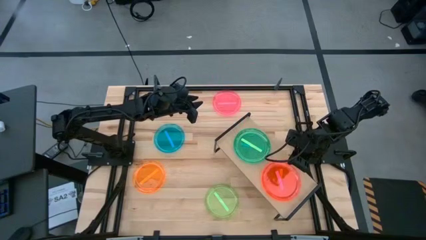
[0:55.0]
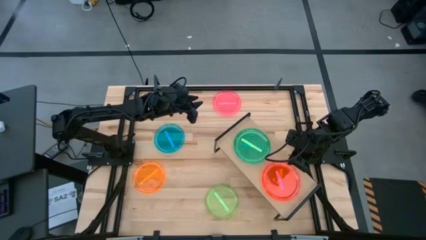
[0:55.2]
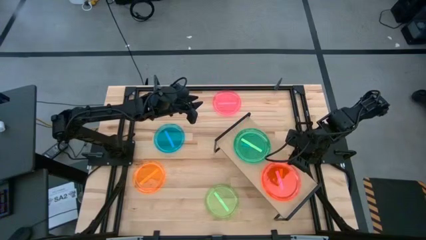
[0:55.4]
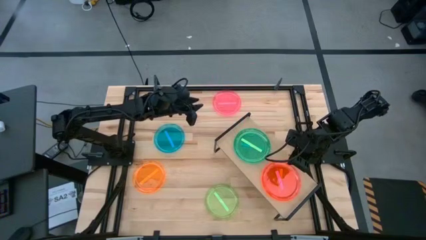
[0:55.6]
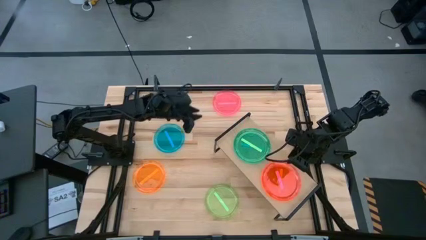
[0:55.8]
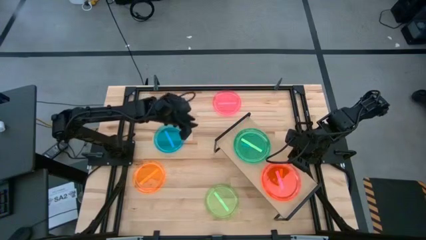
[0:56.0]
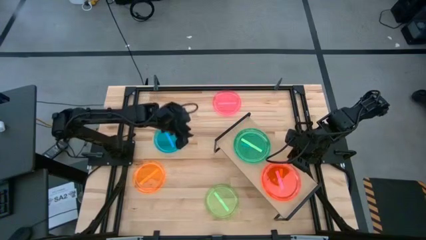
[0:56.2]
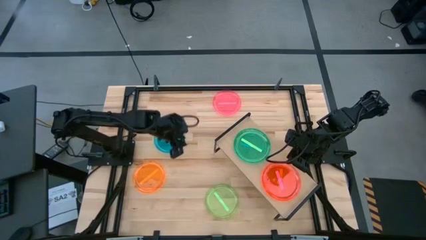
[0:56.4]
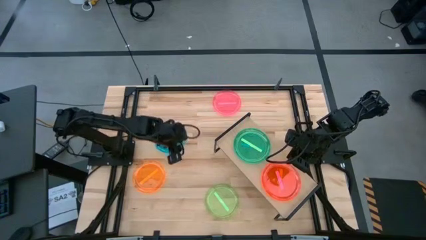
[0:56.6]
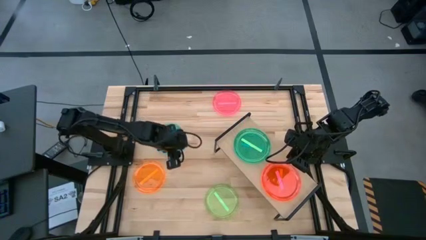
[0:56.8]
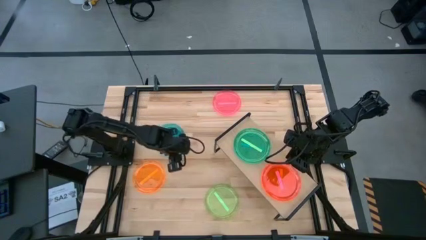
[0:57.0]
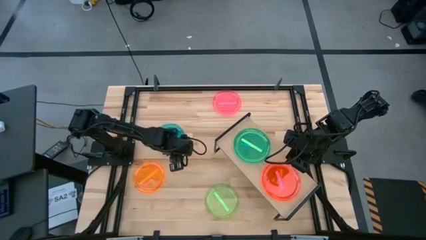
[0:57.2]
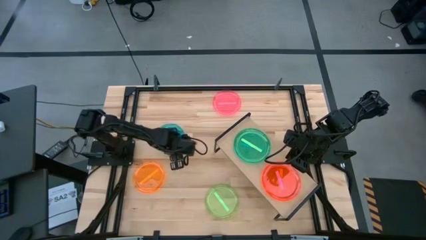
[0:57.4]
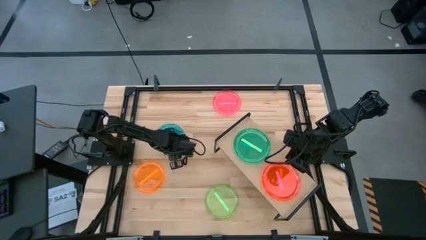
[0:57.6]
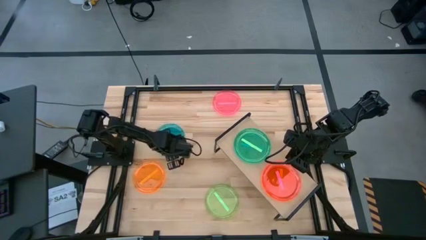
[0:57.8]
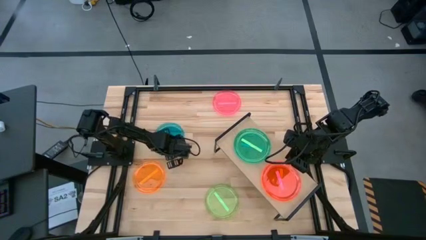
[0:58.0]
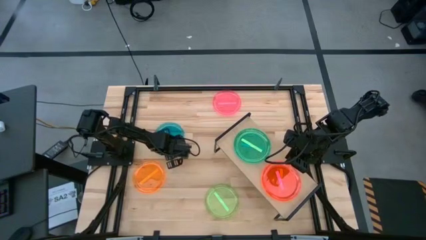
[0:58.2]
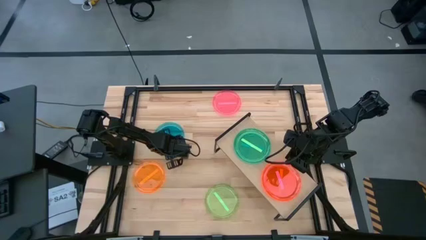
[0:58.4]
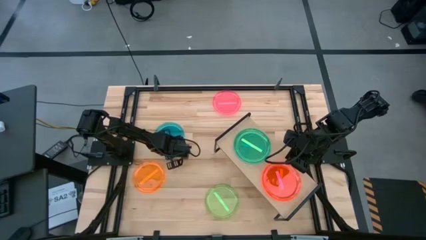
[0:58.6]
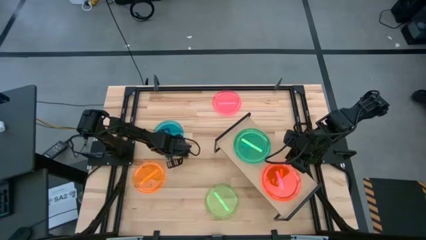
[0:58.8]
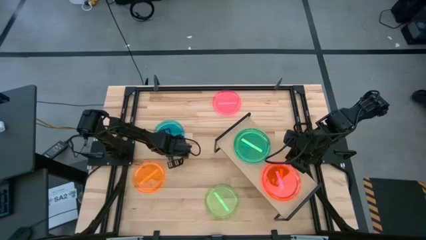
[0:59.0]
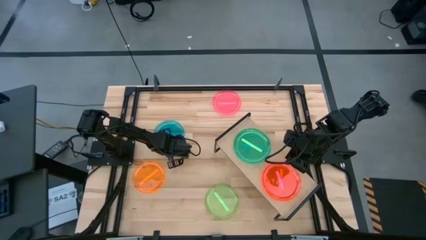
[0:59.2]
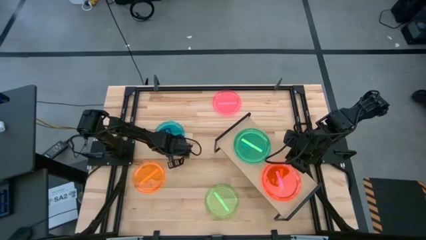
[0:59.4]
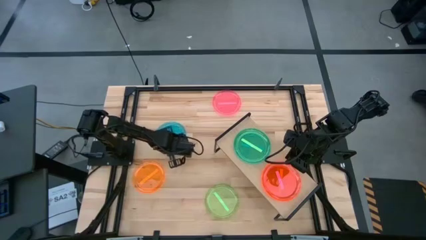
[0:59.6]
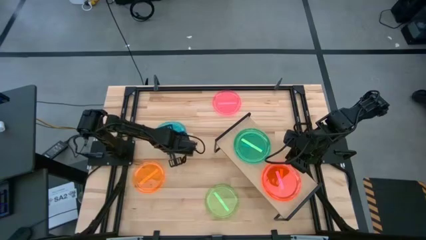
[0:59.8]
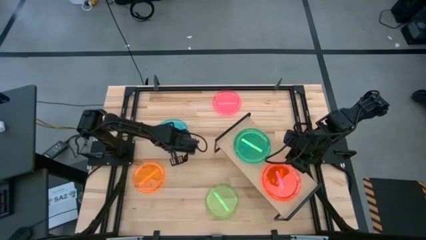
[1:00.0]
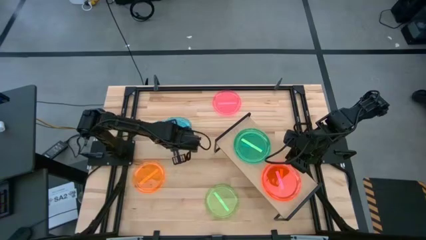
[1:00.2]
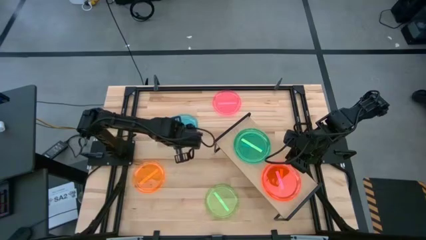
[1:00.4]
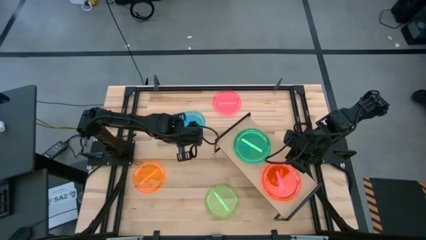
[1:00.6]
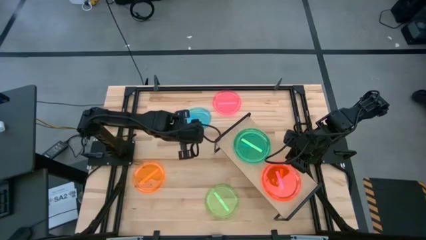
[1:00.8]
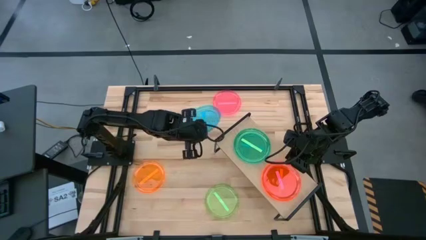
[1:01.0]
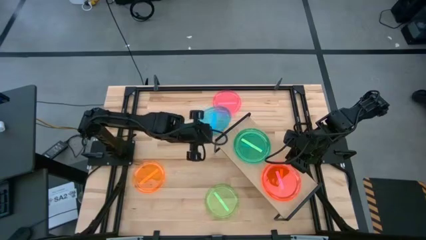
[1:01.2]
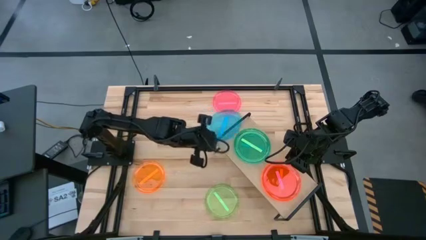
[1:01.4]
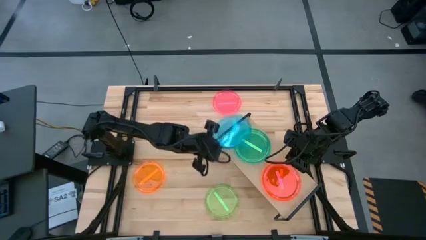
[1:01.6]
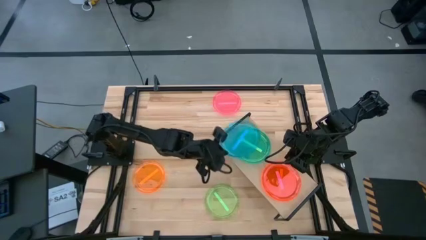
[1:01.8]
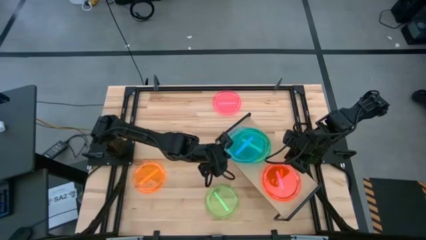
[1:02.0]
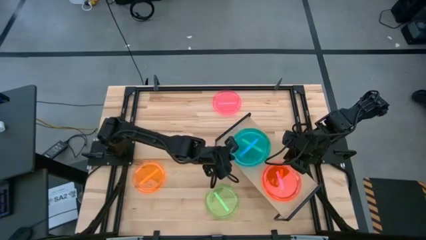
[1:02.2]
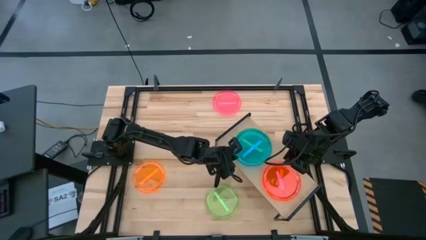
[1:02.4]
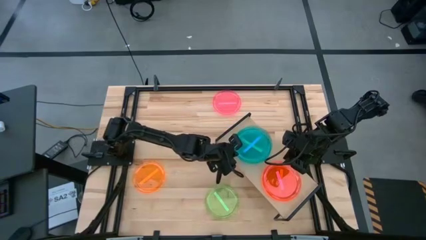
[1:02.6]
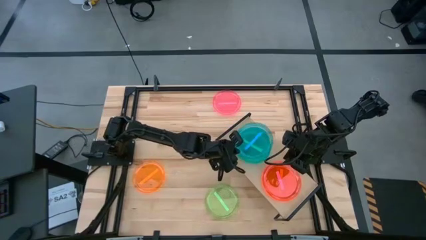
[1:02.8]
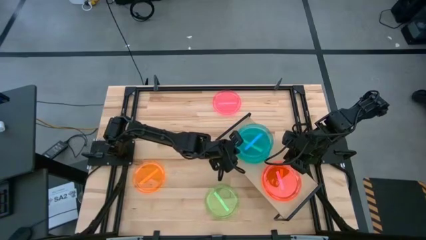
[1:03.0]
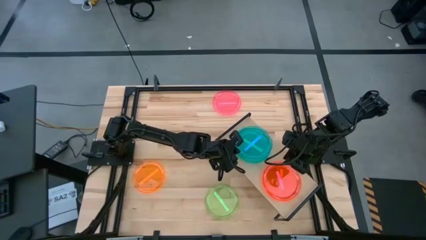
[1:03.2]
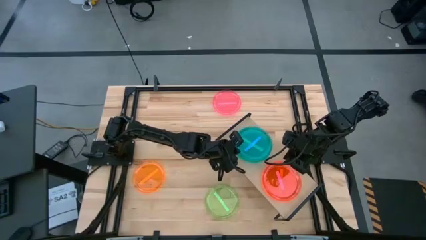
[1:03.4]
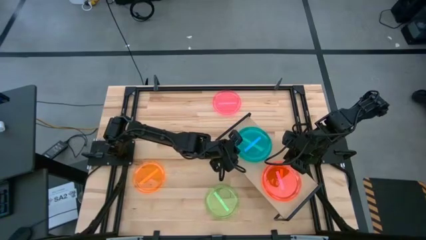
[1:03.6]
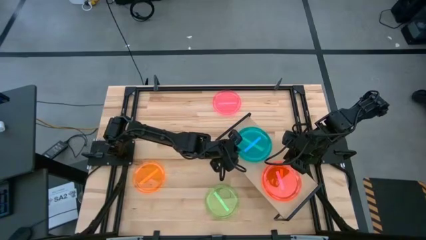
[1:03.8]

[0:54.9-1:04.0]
Task: Place and stack plates onto a shelf
Stack the blue plate on top of the green plate on the shelf

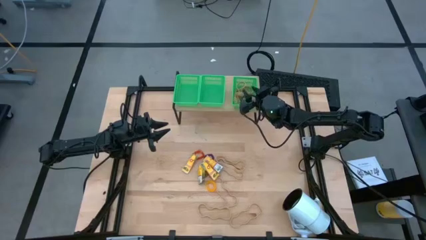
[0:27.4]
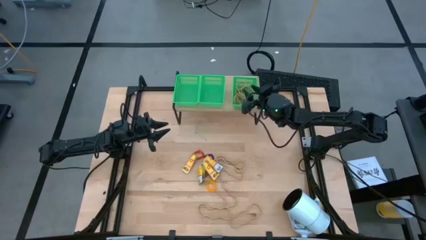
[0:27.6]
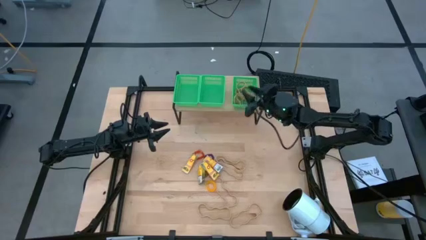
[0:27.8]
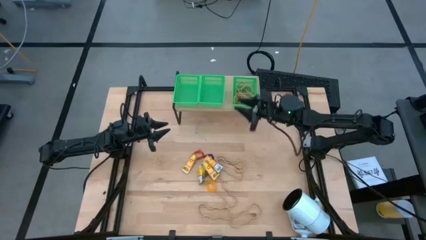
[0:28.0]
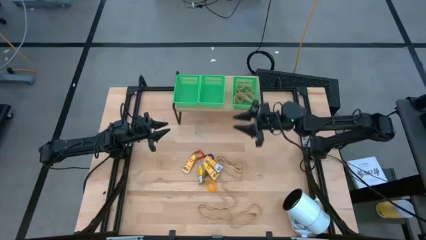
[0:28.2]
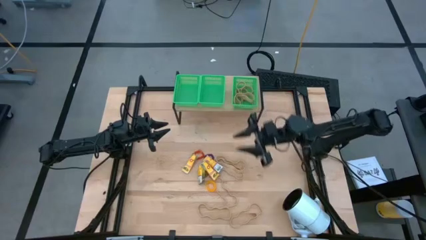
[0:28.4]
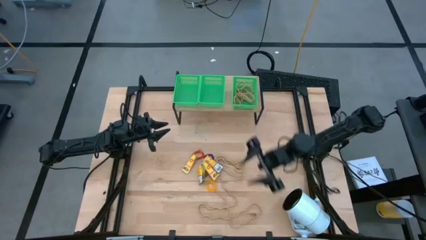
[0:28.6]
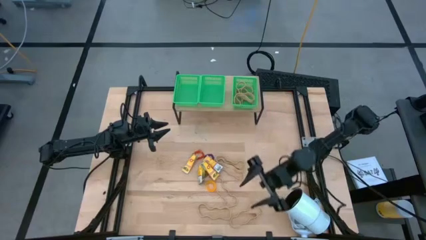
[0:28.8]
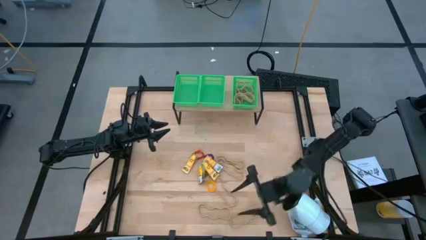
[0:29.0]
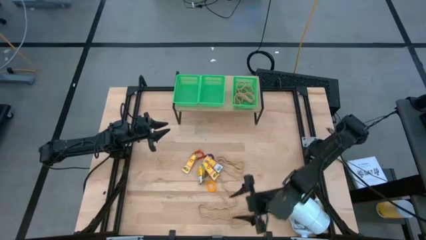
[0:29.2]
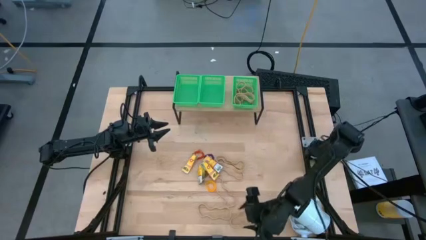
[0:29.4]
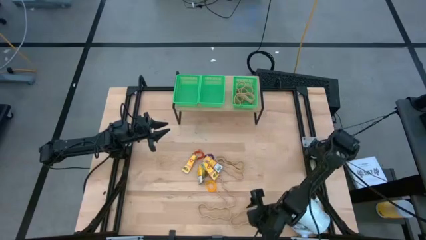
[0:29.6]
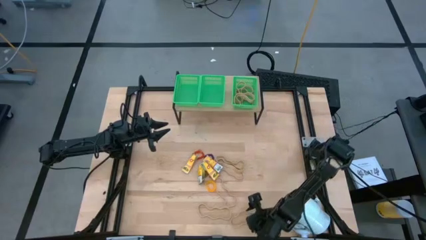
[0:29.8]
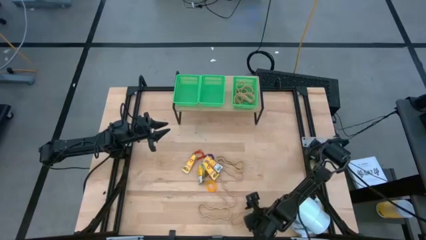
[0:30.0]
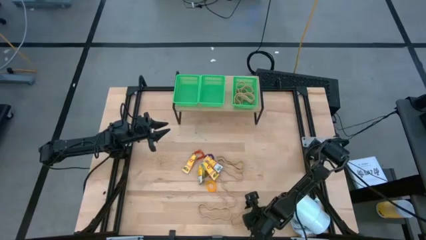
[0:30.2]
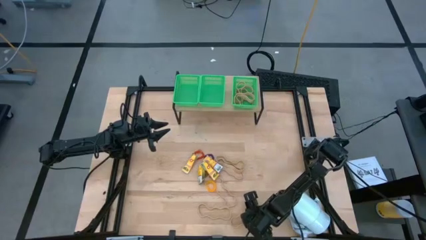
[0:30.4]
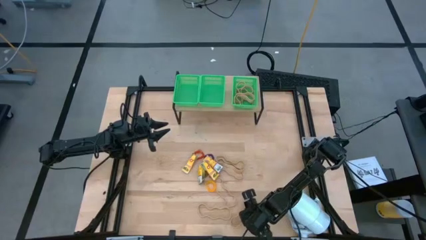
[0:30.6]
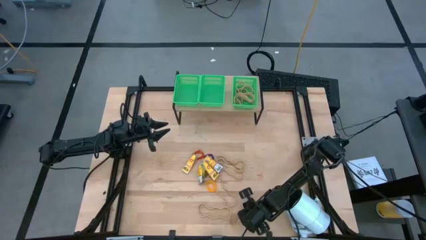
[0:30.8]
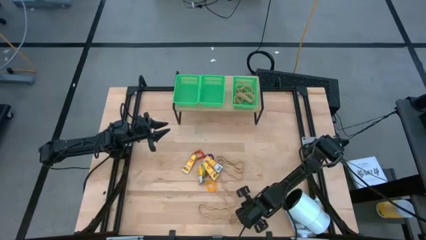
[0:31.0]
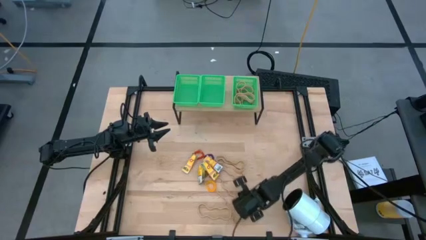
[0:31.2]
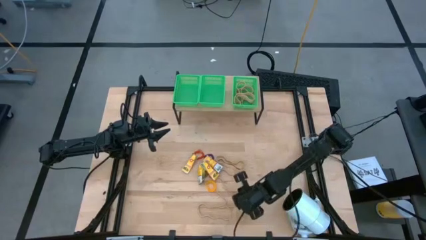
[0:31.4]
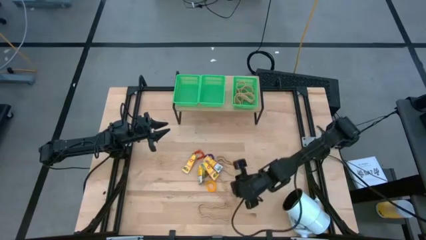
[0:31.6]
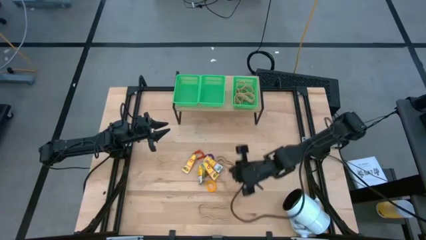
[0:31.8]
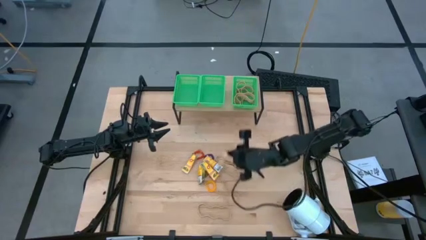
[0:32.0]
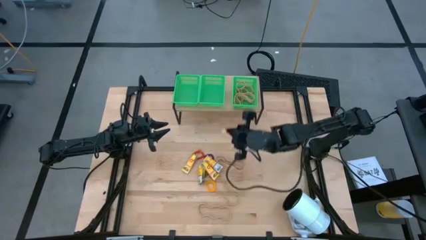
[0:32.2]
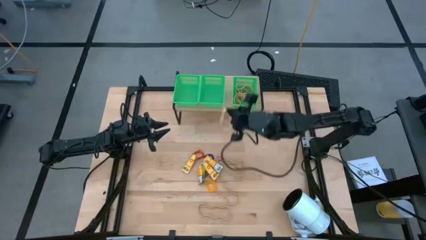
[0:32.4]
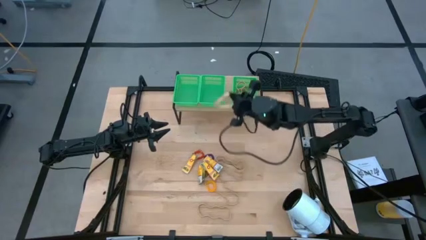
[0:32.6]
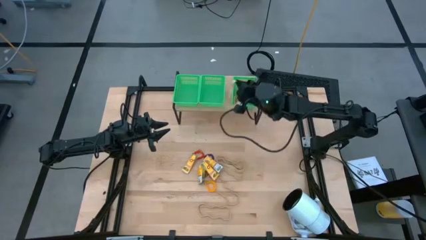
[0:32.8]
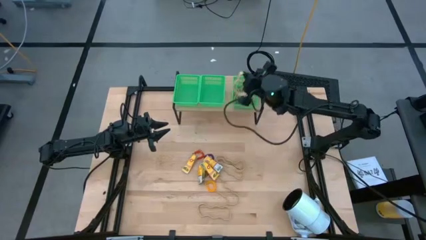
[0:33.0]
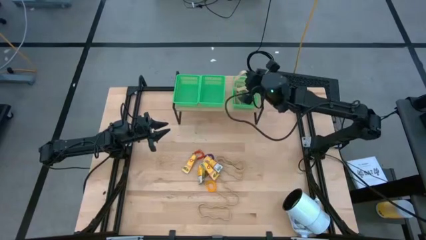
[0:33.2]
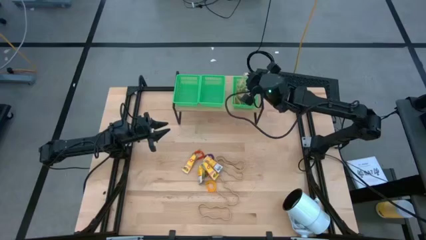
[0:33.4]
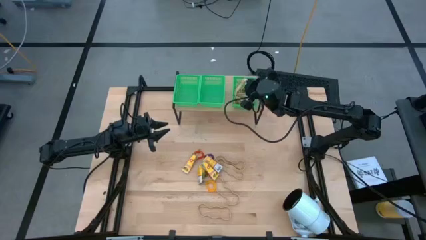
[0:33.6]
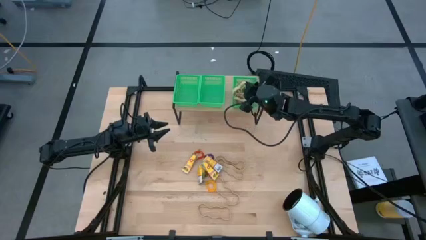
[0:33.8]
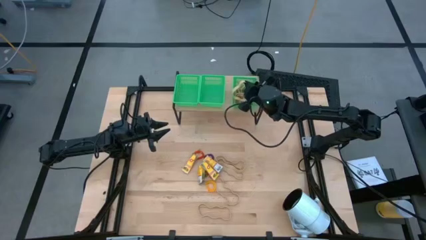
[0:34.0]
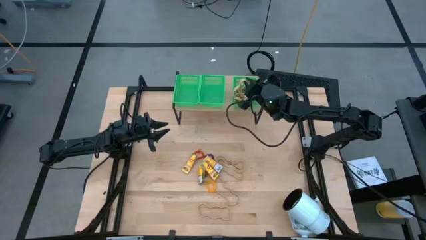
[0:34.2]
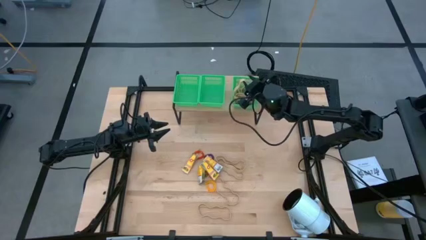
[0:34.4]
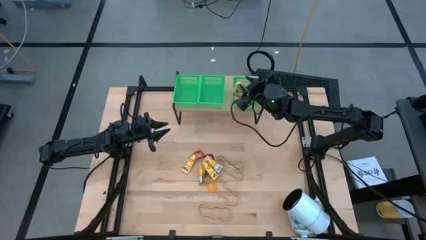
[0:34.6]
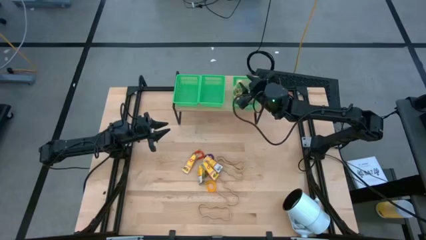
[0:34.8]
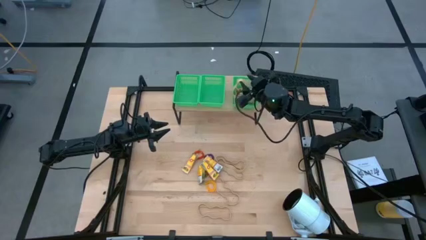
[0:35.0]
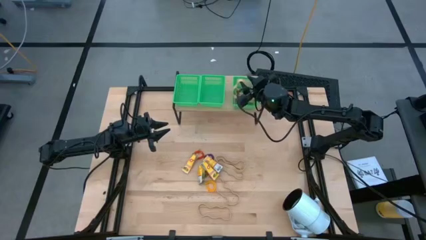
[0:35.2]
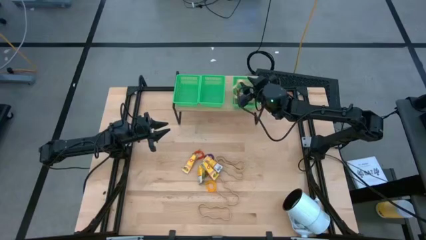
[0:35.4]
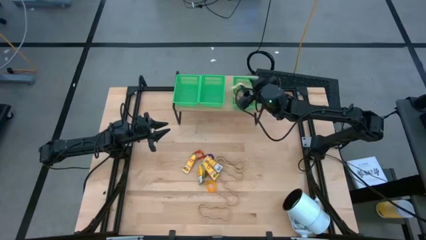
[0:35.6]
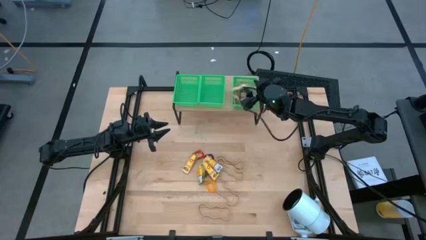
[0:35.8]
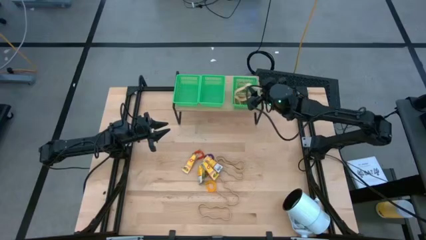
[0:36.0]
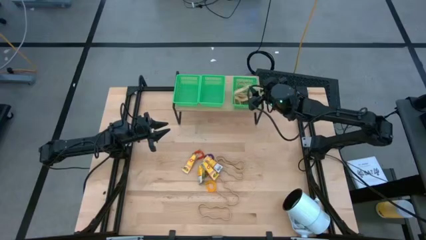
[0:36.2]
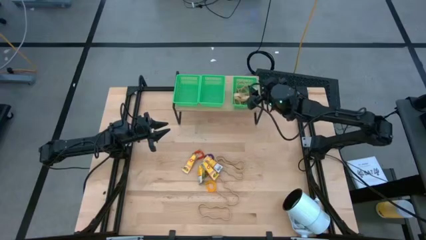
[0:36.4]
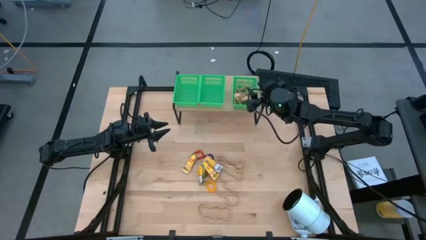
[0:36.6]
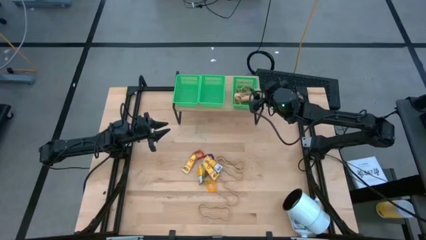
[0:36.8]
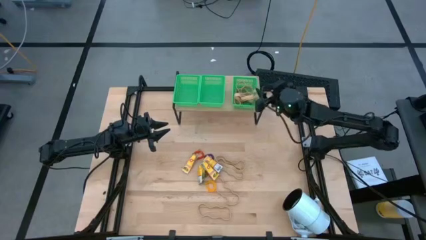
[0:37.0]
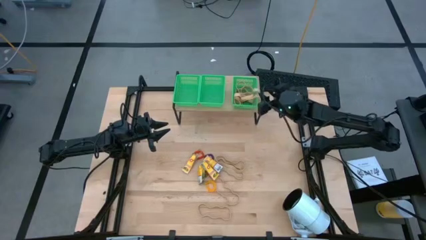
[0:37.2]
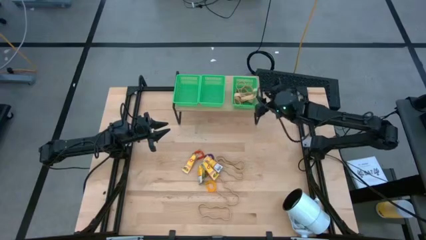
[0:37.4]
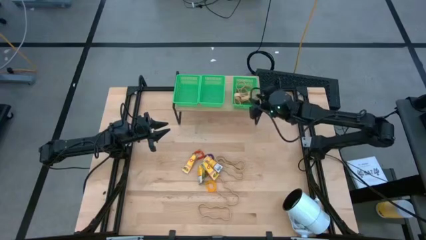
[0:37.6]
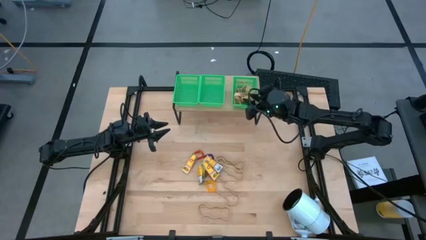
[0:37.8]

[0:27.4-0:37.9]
Task: Pick & Place Office Desk Supplies
Put the brown rubber band into the right green bin on the shelf
